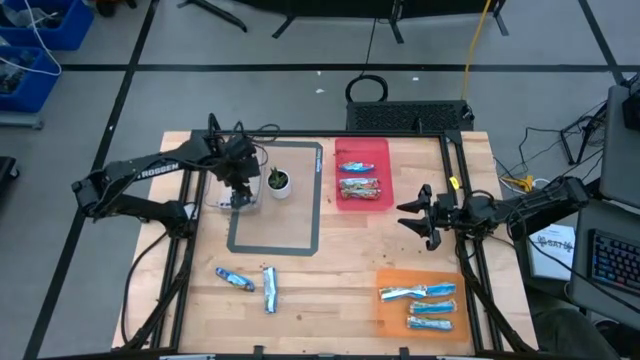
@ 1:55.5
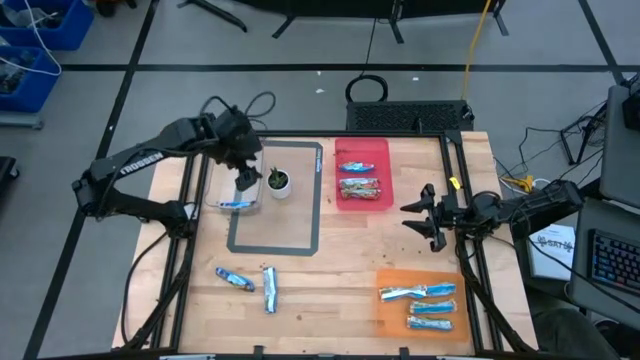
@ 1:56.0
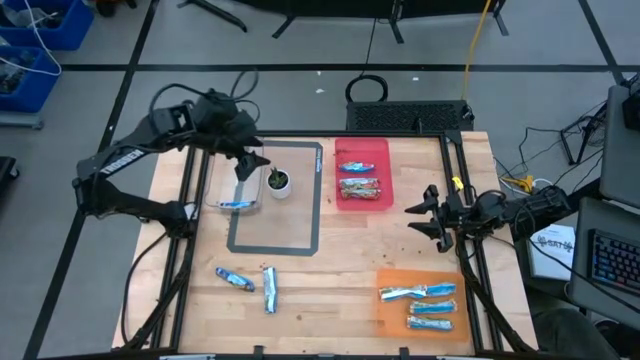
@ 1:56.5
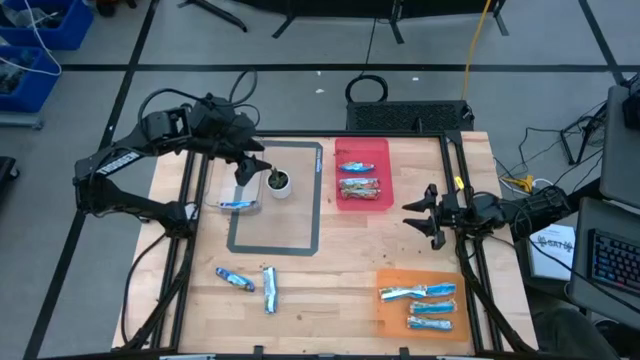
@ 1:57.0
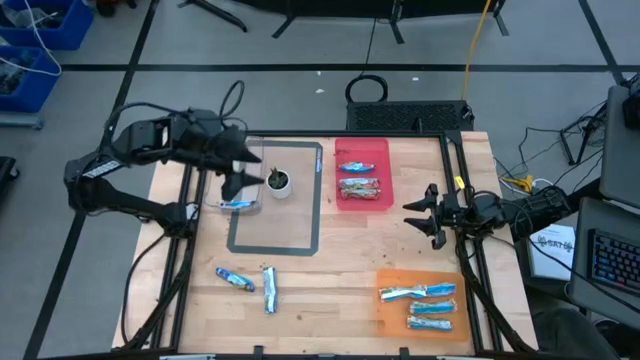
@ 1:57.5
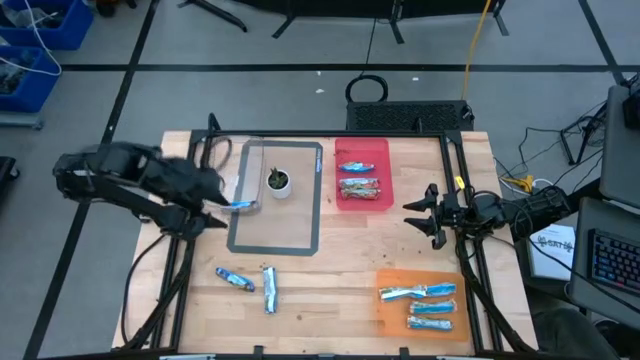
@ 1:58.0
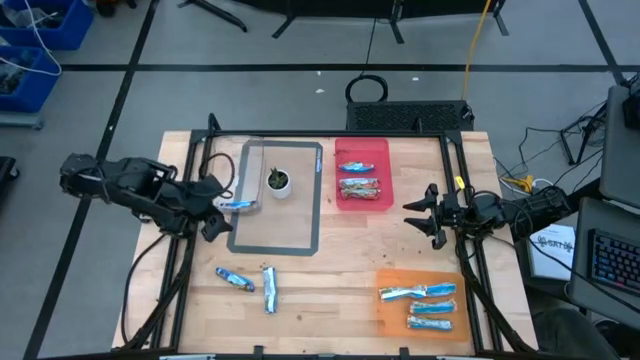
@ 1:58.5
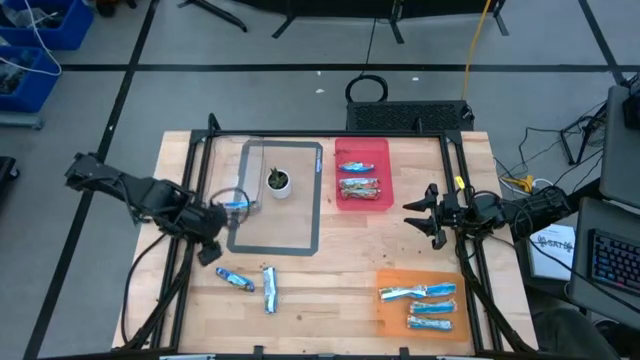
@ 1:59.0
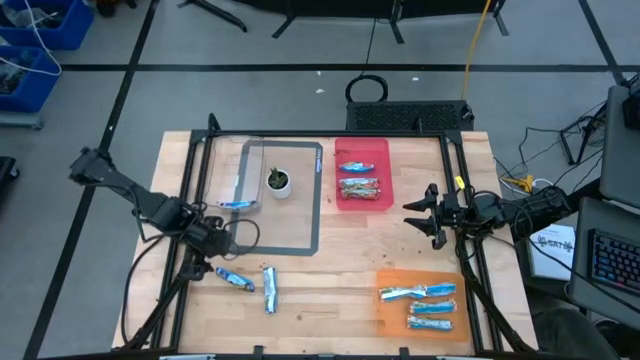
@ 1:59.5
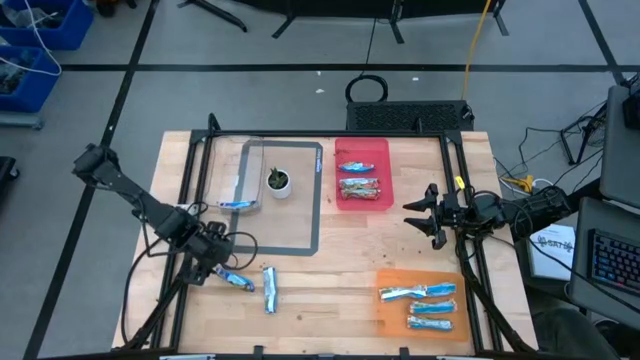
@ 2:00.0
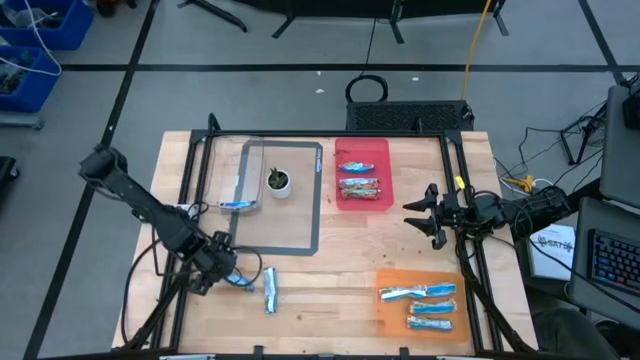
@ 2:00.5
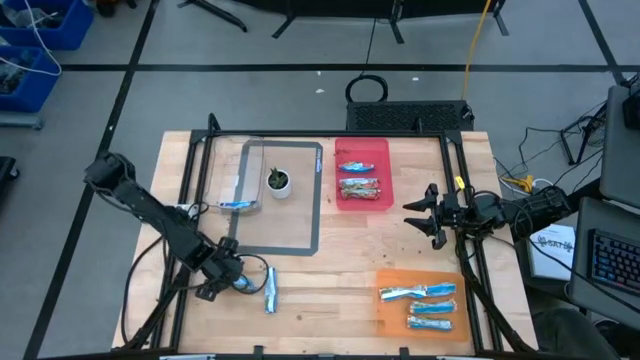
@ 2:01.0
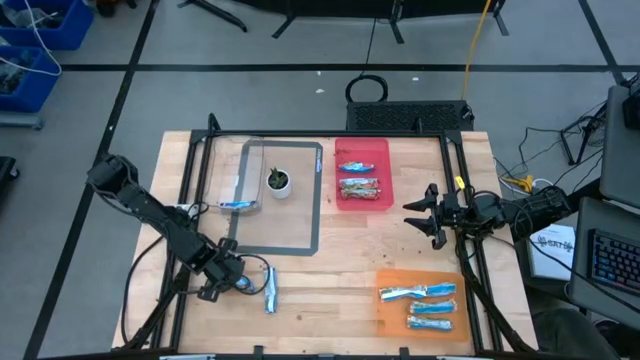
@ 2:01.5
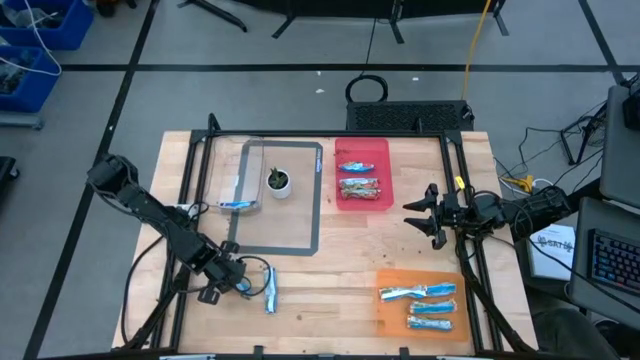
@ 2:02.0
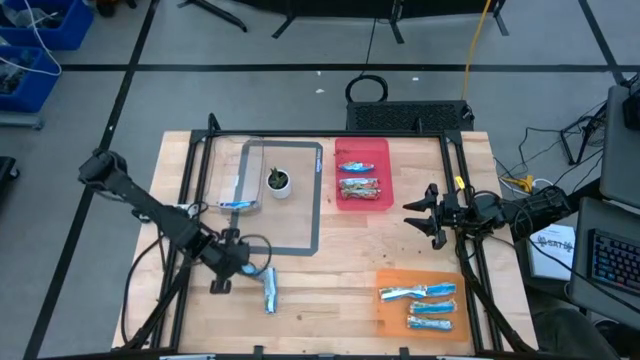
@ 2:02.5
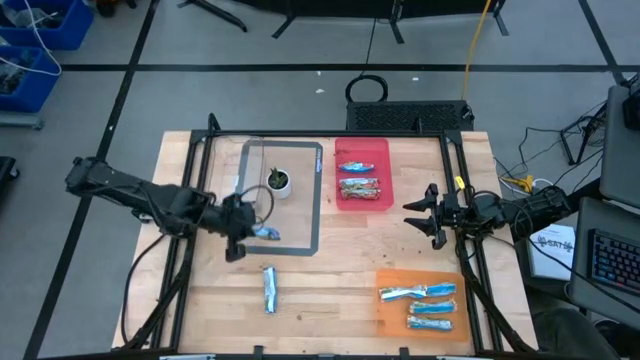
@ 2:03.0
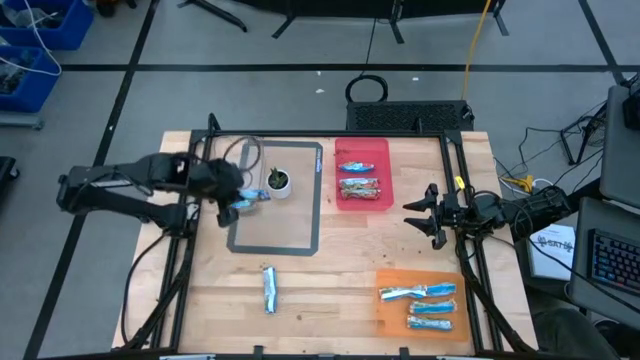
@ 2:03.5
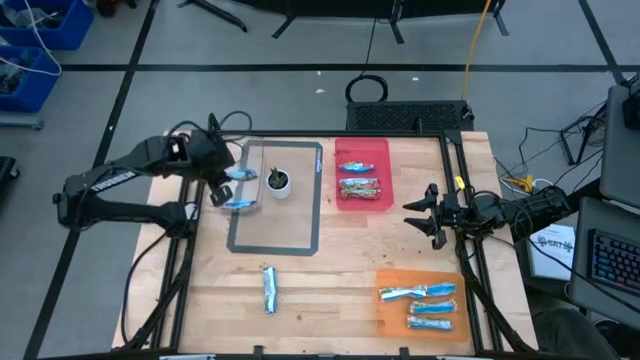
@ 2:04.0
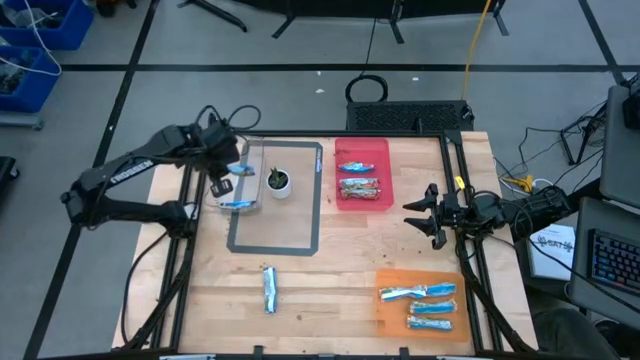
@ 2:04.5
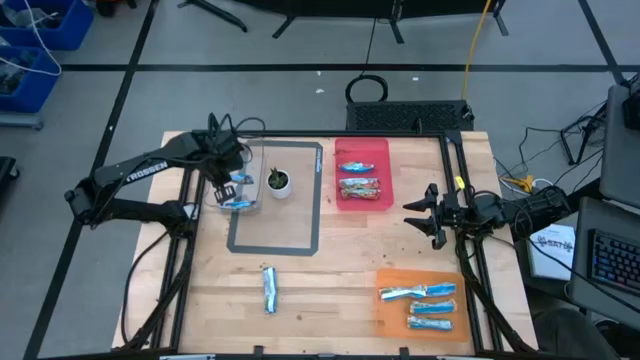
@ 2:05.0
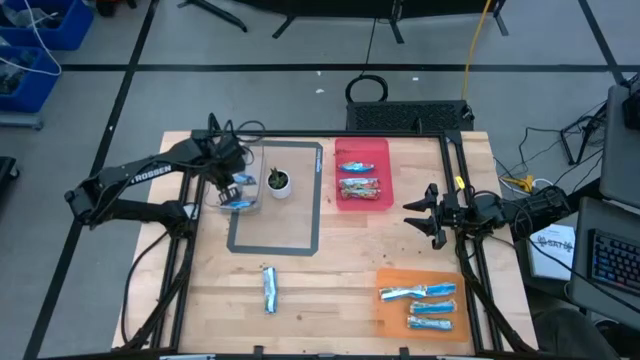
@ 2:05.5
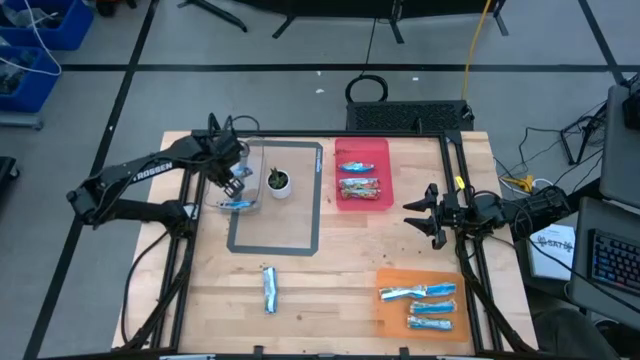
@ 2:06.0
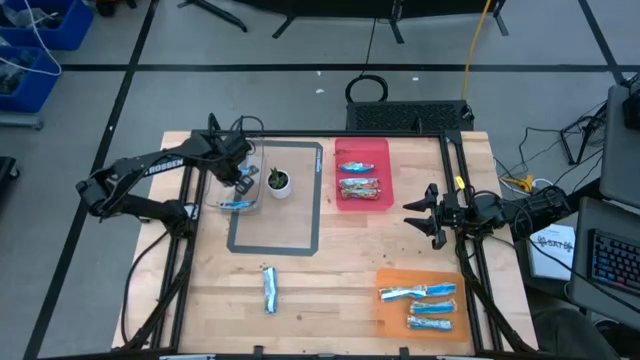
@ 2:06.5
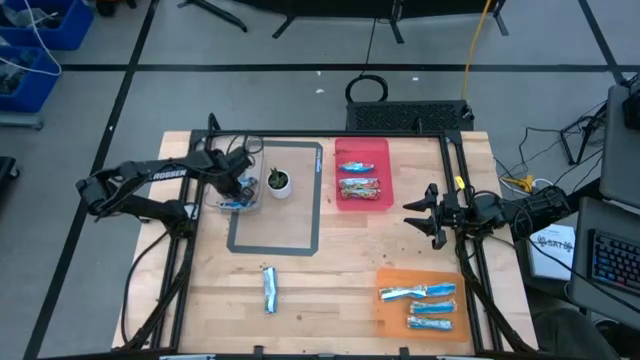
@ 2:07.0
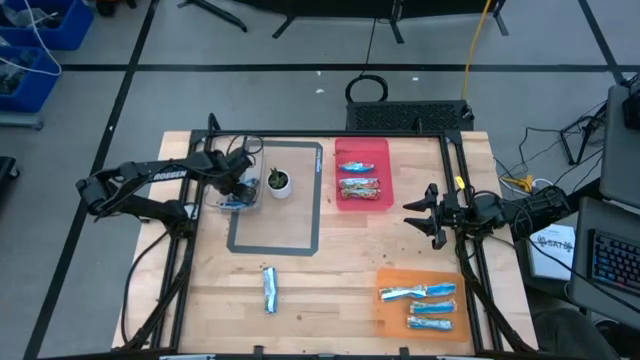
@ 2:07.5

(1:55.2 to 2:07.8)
Task: Pick and place Granola Bars by type
Put the blue granola bar into the transparent bin

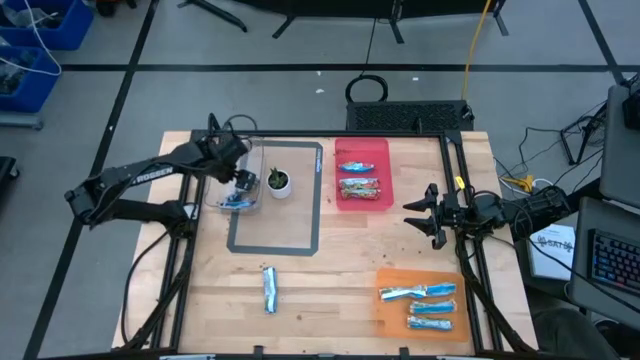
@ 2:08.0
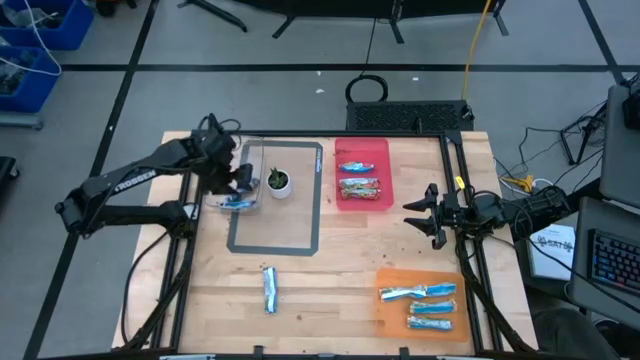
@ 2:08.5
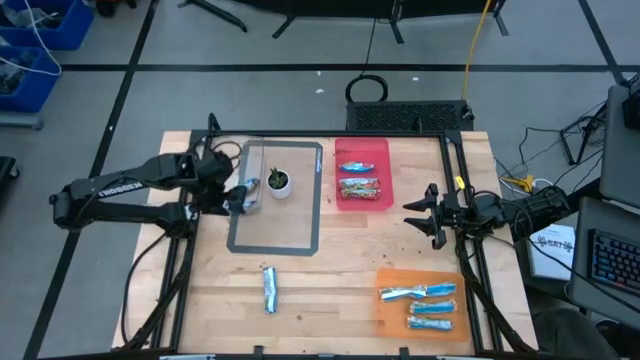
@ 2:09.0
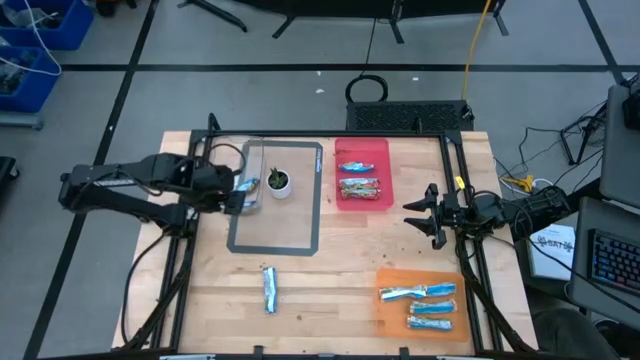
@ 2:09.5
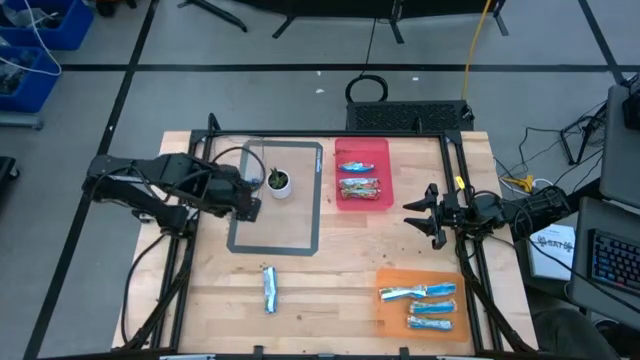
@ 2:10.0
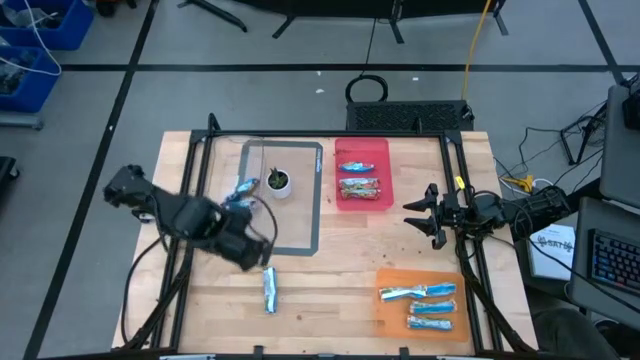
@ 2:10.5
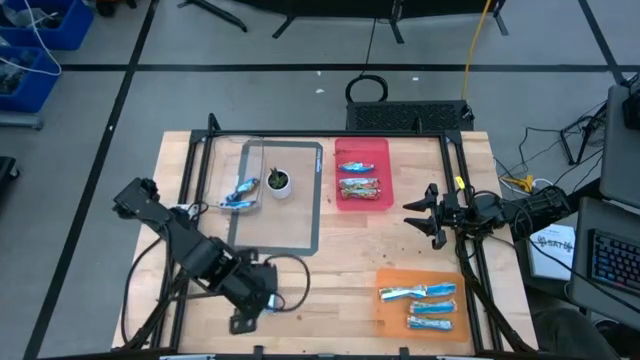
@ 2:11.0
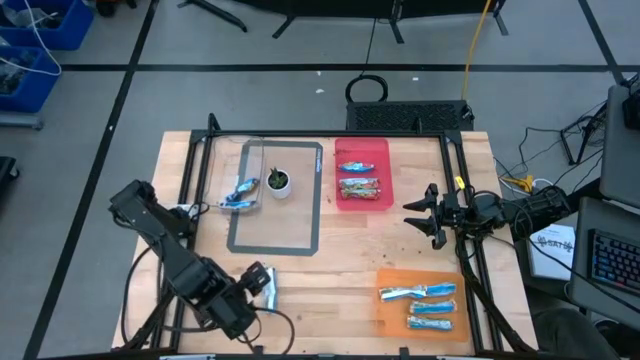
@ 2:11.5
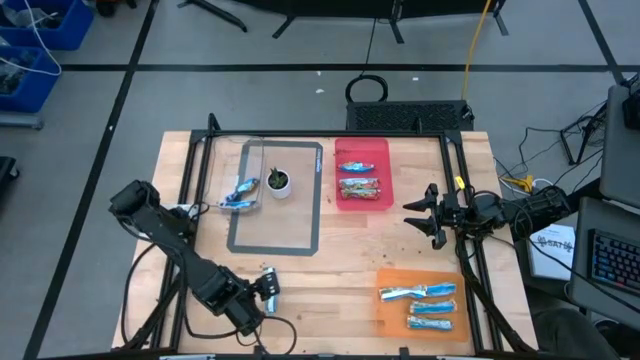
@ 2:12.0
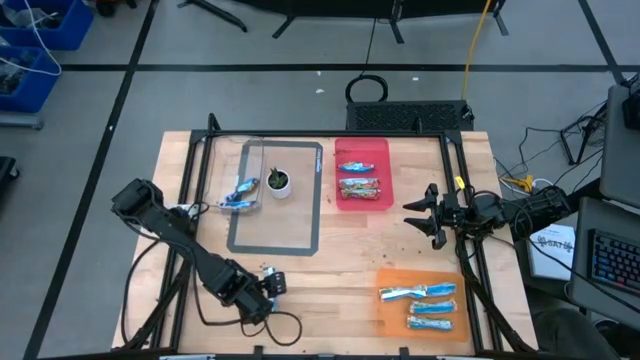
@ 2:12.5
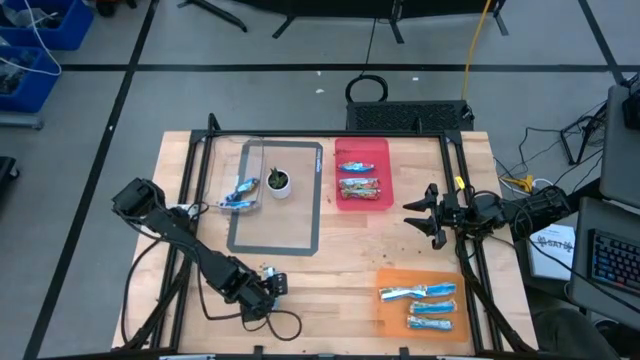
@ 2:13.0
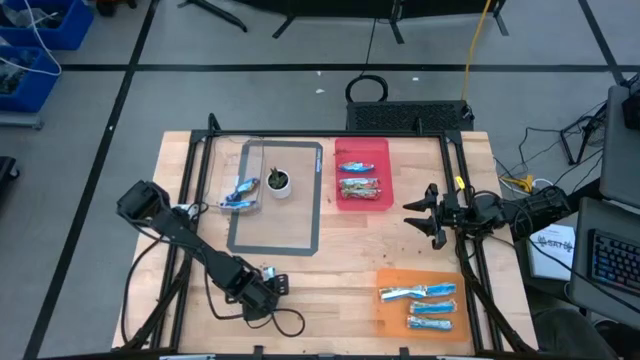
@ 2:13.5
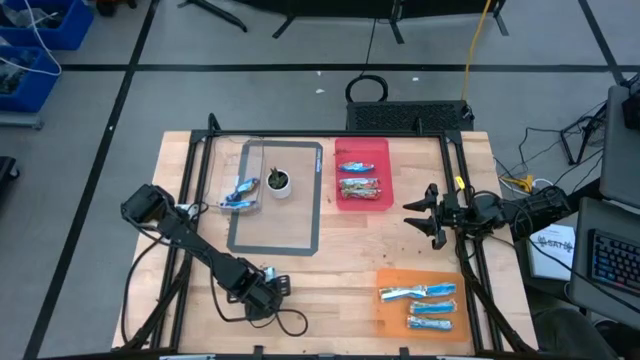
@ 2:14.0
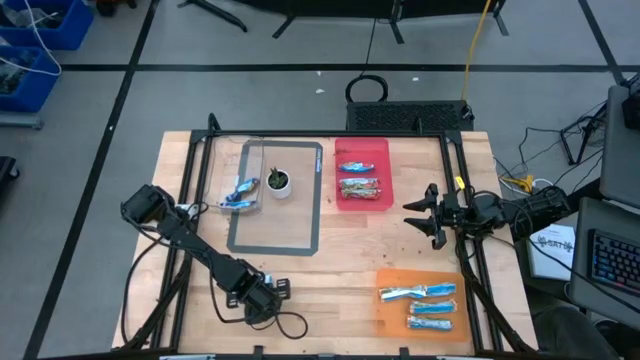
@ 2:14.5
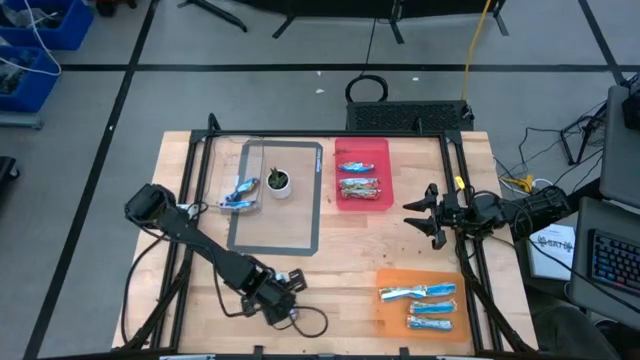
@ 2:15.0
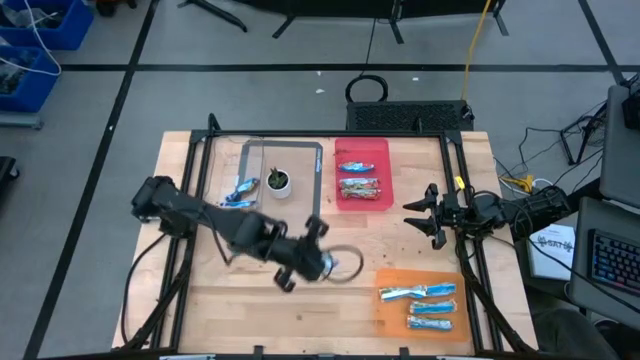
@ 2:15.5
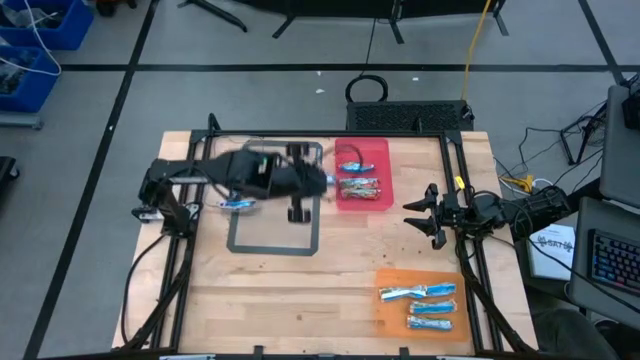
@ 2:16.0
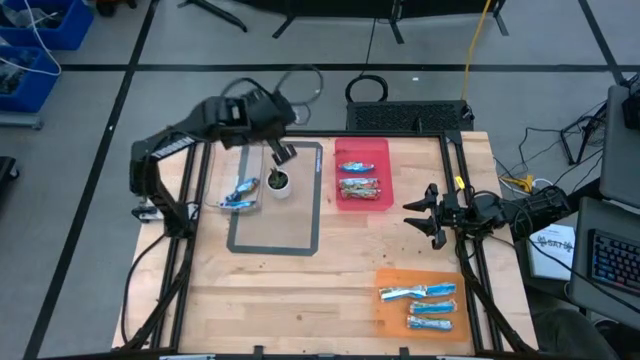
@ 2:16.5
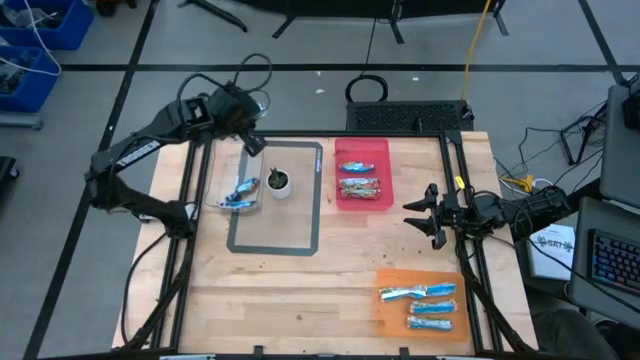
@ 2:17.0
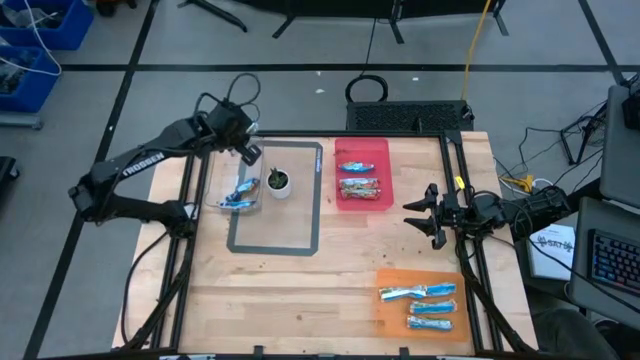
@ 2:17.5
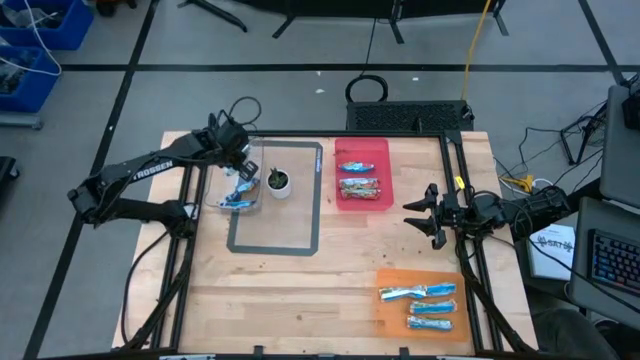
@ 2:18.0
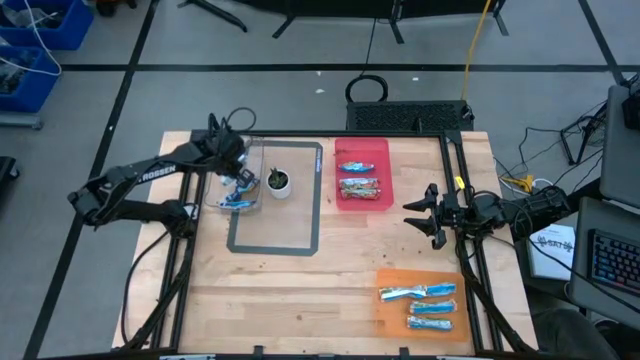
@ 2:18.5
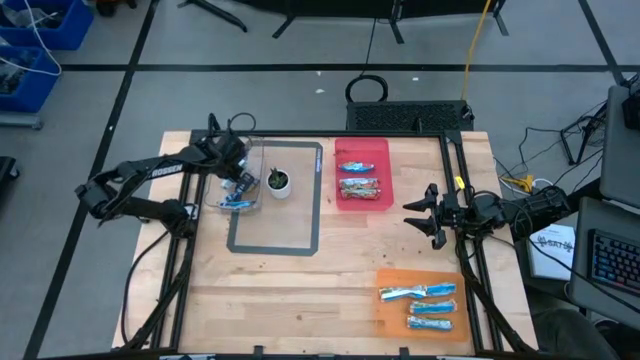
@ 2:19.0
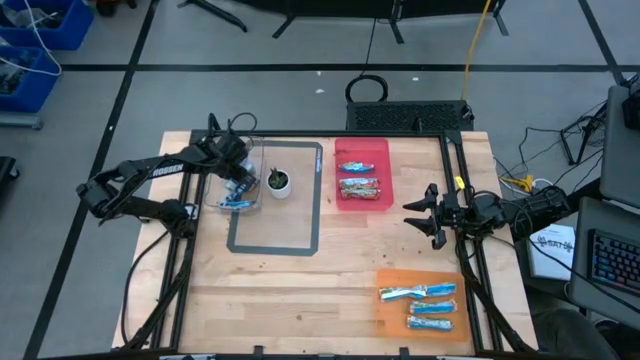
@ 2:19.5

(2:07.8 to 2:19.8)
Put the blue granola bar into the transparent bin
